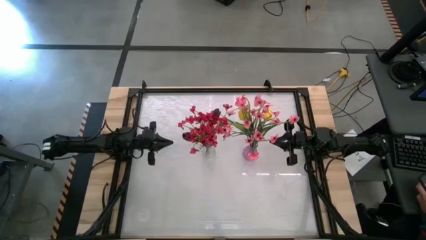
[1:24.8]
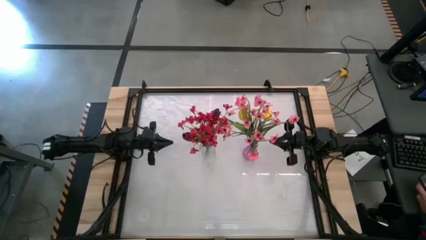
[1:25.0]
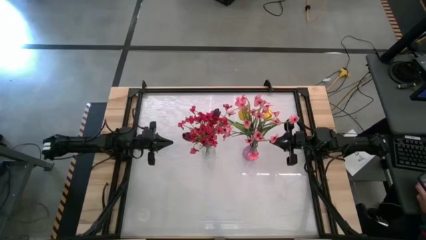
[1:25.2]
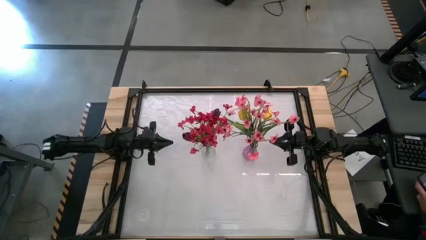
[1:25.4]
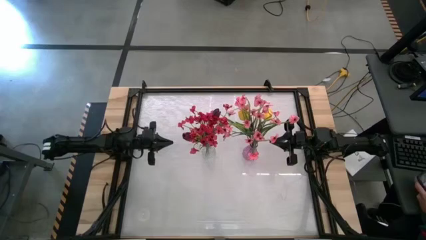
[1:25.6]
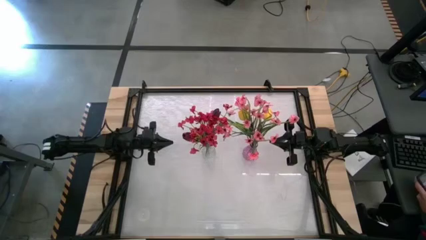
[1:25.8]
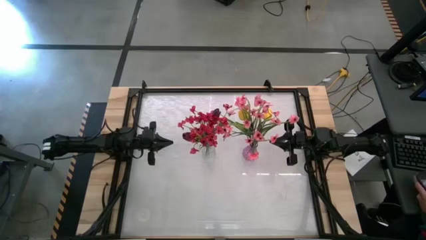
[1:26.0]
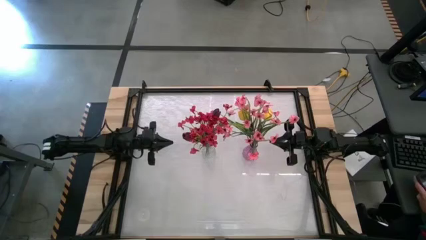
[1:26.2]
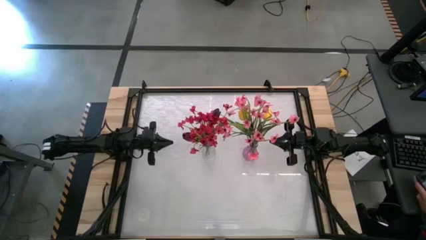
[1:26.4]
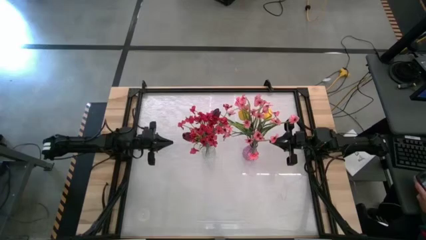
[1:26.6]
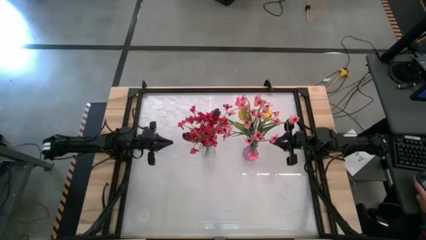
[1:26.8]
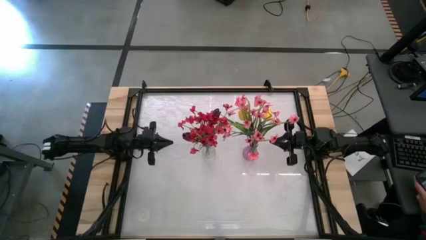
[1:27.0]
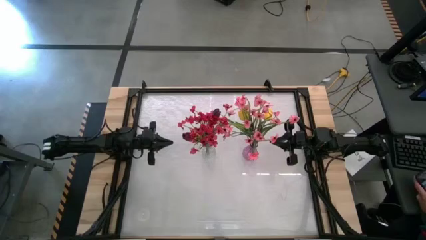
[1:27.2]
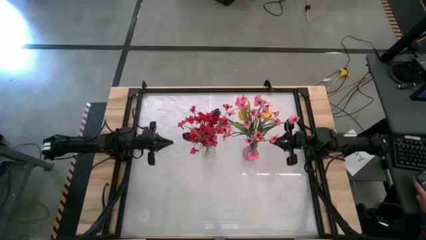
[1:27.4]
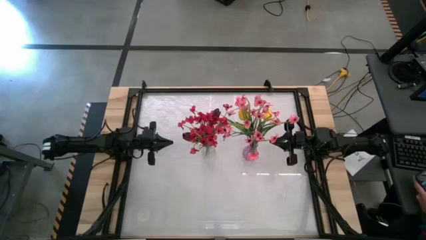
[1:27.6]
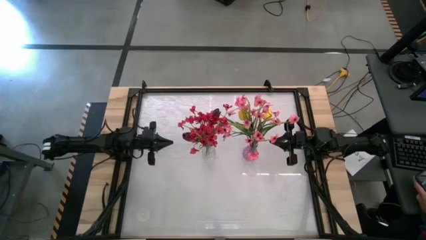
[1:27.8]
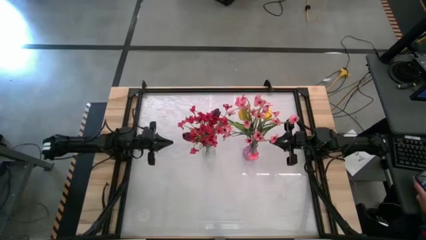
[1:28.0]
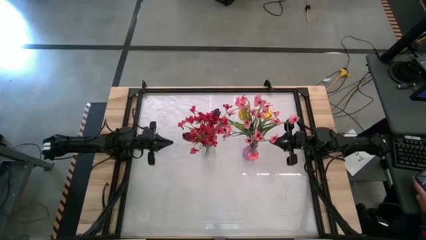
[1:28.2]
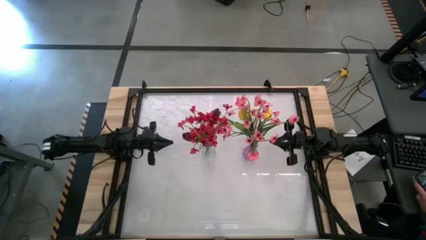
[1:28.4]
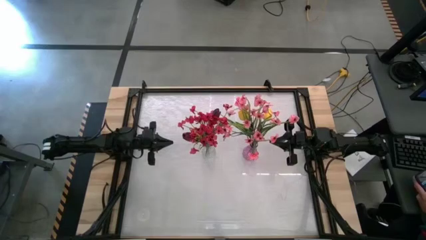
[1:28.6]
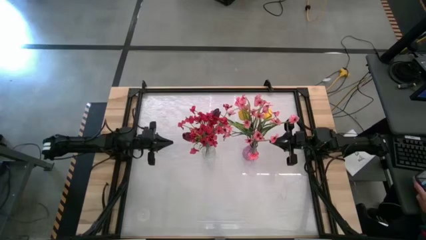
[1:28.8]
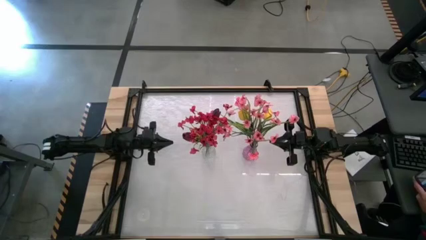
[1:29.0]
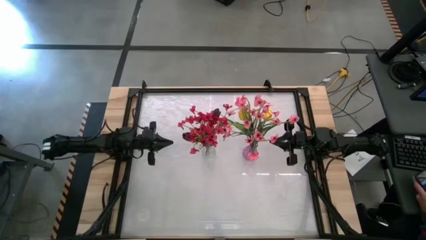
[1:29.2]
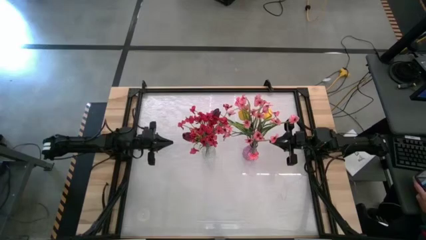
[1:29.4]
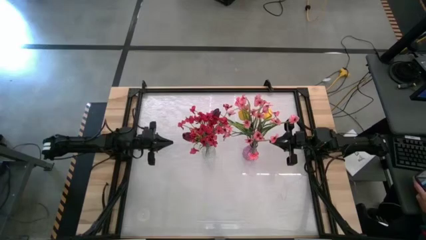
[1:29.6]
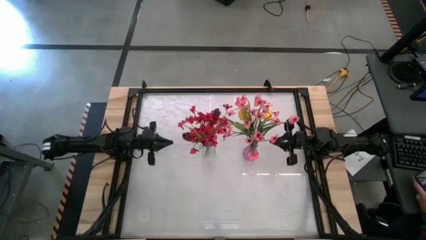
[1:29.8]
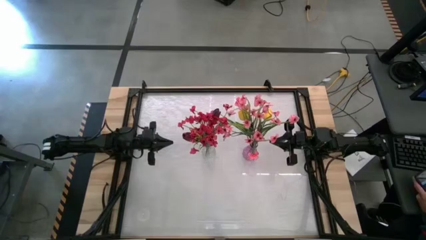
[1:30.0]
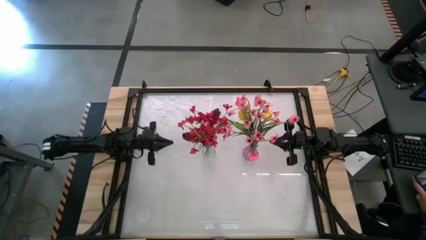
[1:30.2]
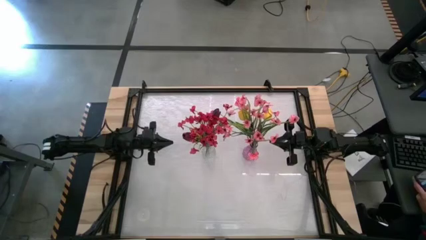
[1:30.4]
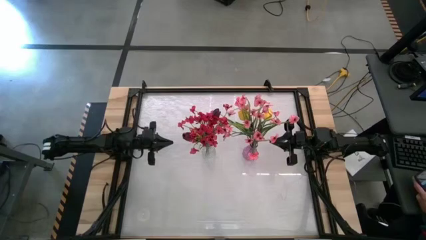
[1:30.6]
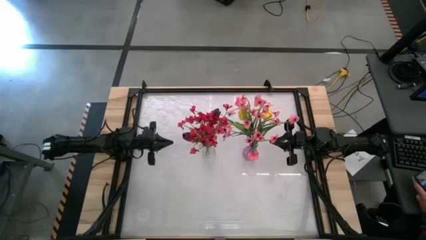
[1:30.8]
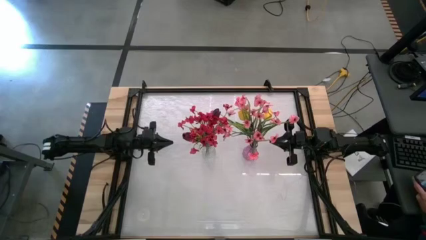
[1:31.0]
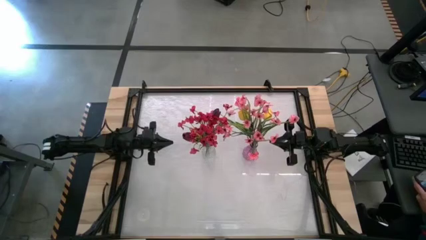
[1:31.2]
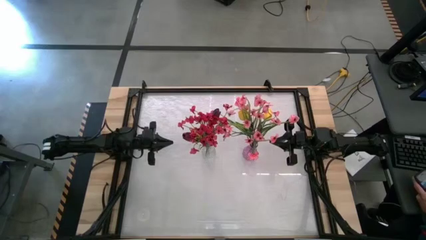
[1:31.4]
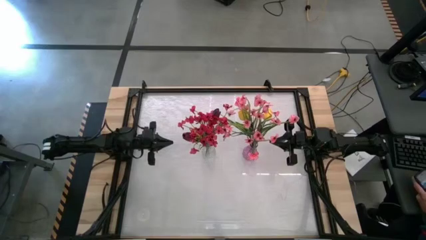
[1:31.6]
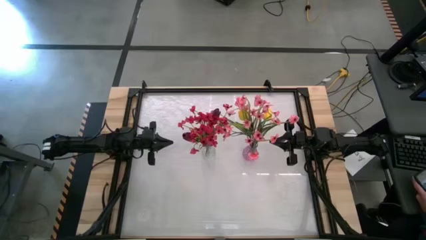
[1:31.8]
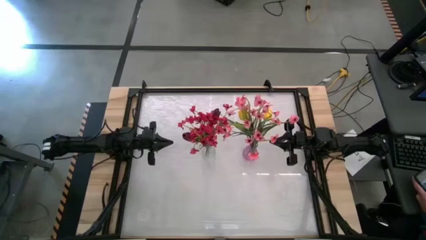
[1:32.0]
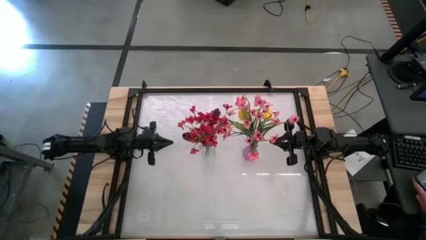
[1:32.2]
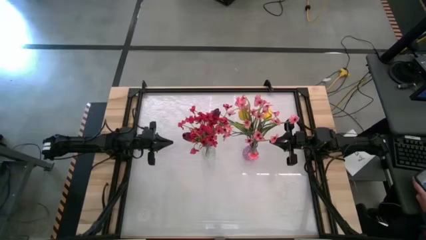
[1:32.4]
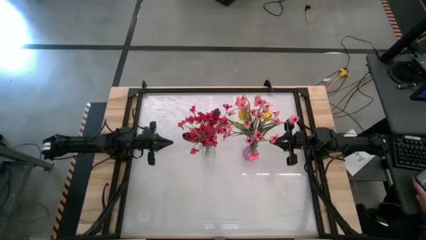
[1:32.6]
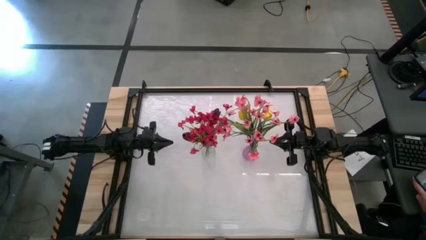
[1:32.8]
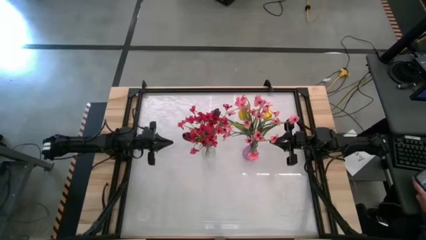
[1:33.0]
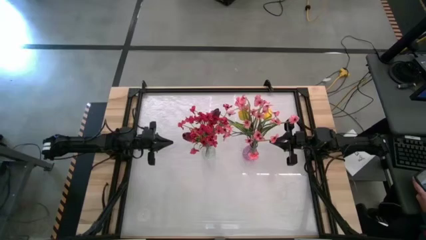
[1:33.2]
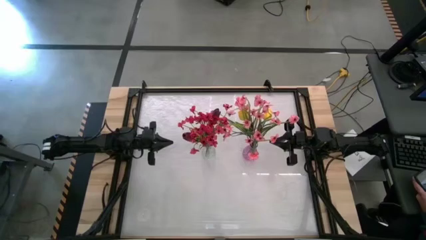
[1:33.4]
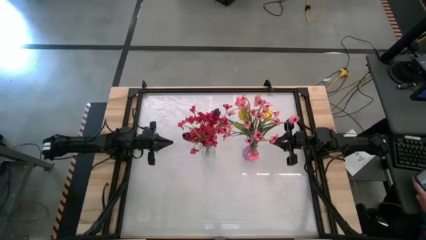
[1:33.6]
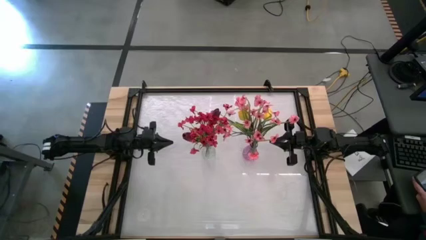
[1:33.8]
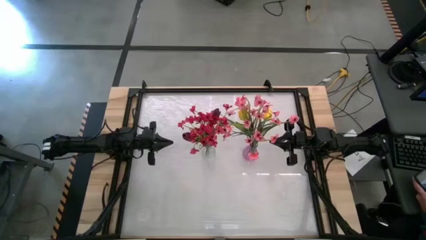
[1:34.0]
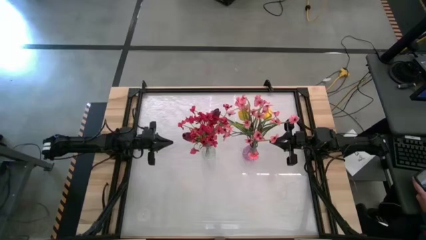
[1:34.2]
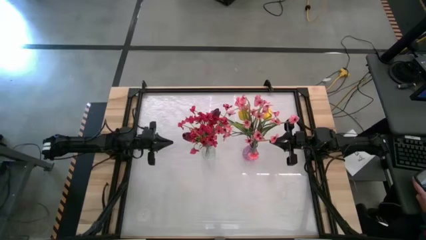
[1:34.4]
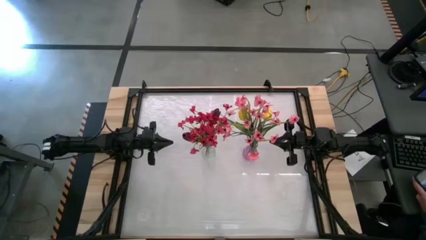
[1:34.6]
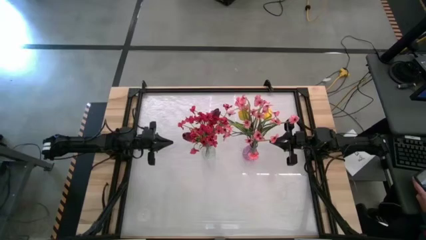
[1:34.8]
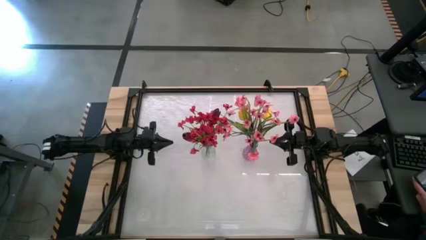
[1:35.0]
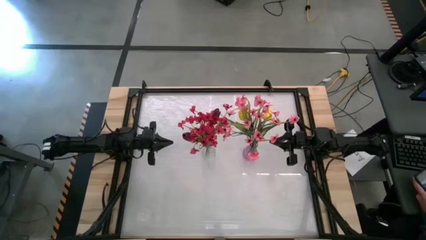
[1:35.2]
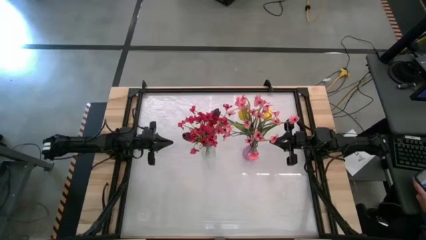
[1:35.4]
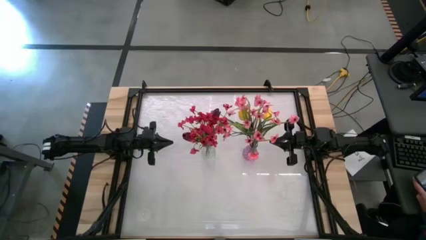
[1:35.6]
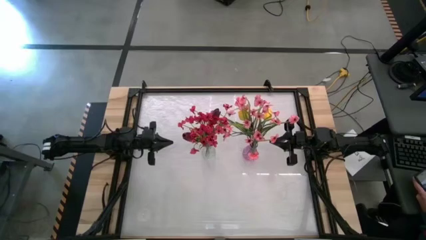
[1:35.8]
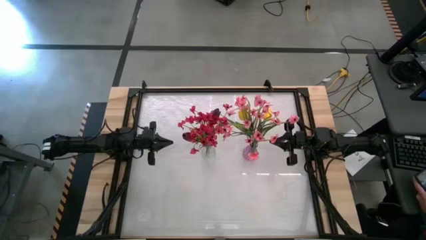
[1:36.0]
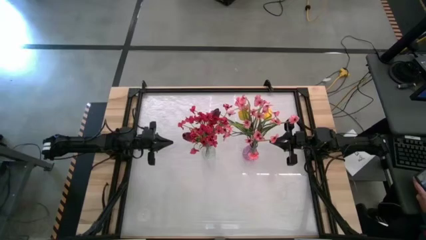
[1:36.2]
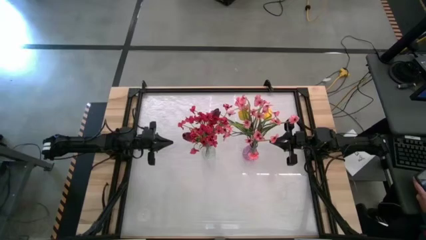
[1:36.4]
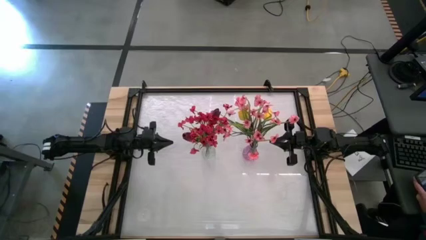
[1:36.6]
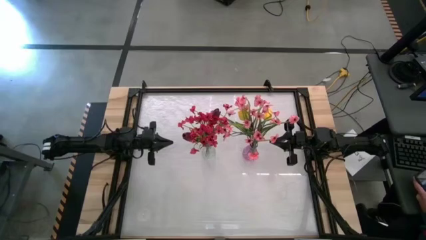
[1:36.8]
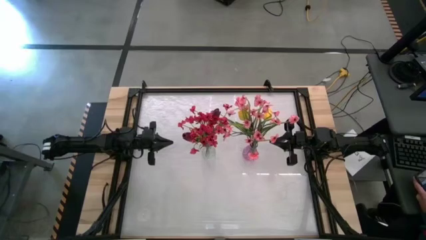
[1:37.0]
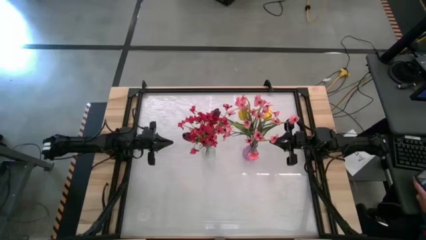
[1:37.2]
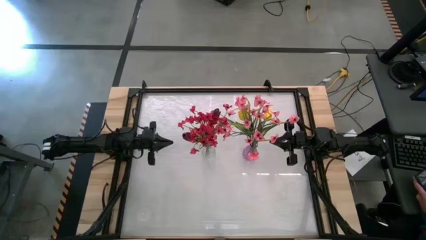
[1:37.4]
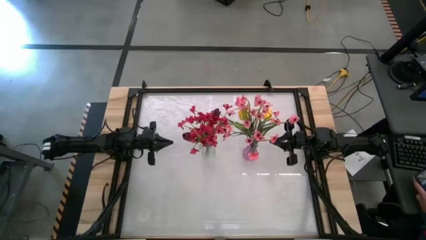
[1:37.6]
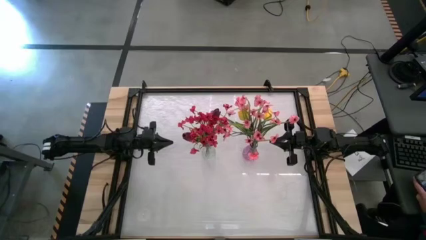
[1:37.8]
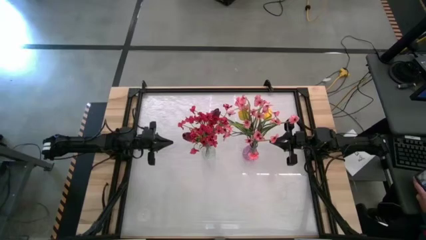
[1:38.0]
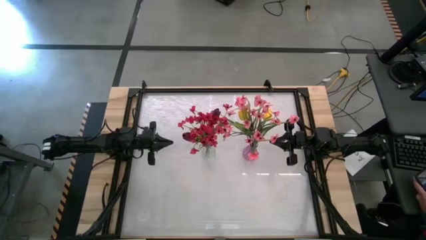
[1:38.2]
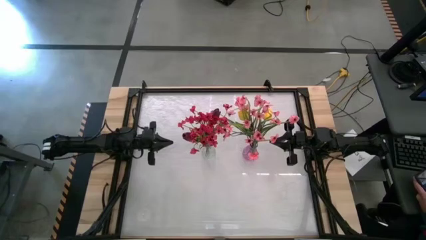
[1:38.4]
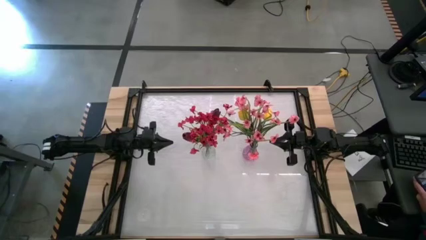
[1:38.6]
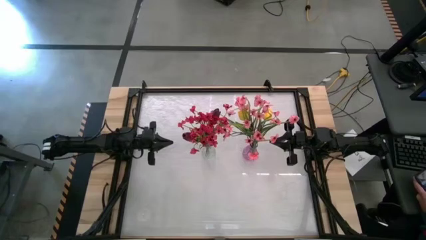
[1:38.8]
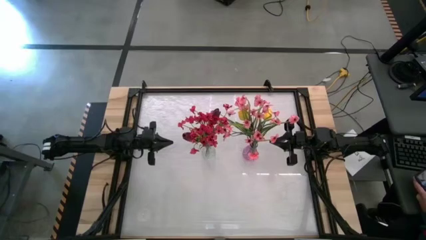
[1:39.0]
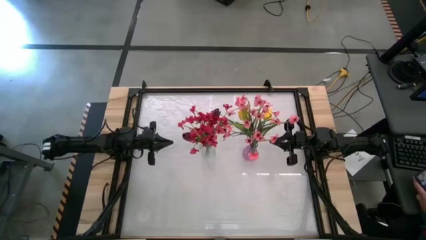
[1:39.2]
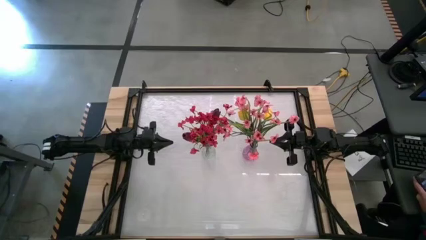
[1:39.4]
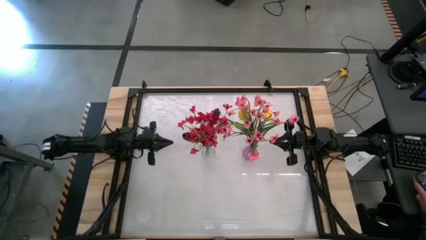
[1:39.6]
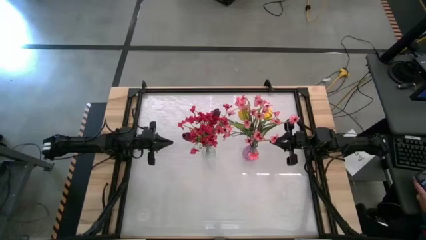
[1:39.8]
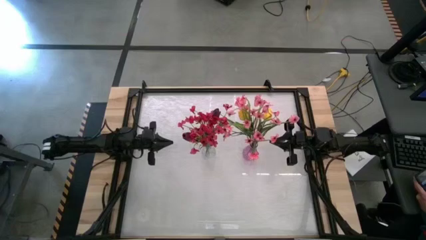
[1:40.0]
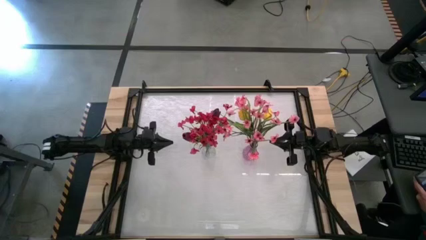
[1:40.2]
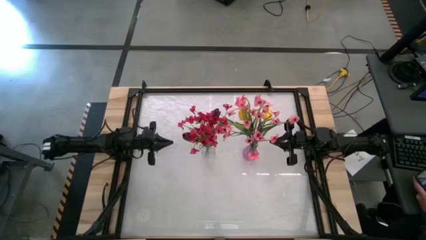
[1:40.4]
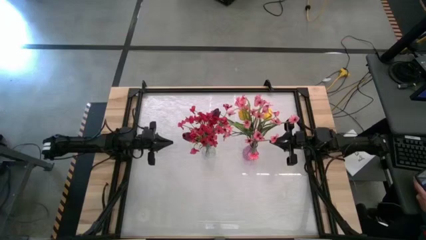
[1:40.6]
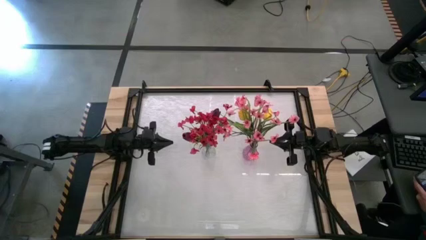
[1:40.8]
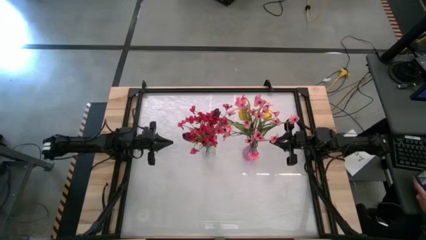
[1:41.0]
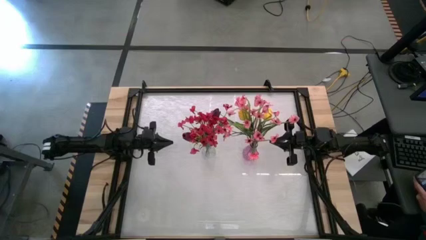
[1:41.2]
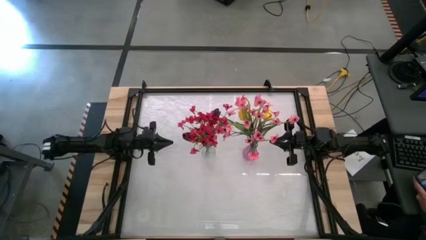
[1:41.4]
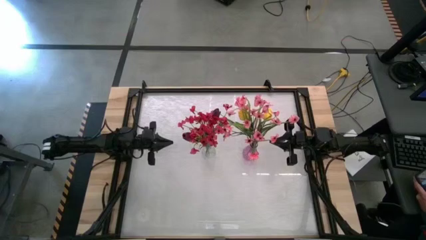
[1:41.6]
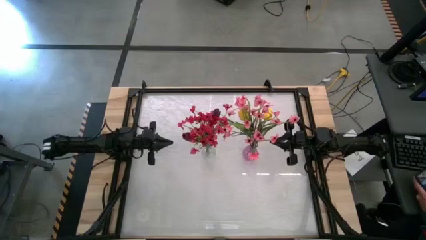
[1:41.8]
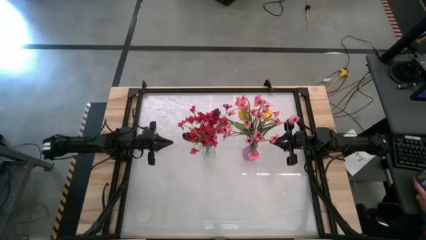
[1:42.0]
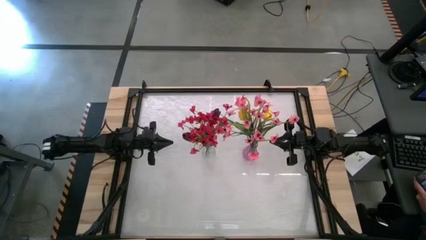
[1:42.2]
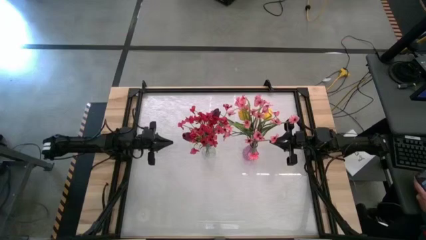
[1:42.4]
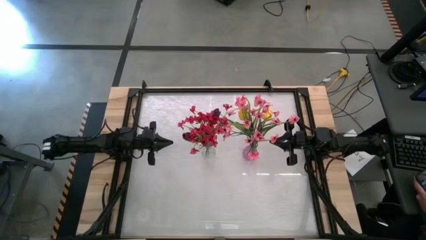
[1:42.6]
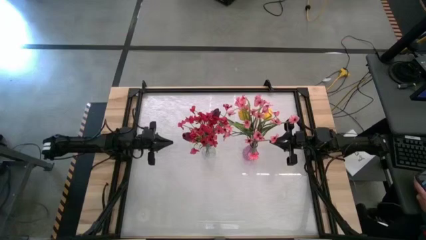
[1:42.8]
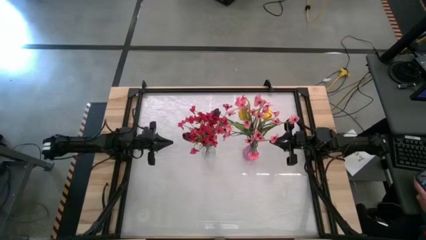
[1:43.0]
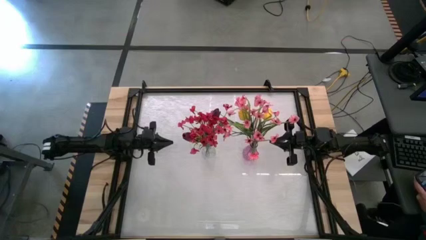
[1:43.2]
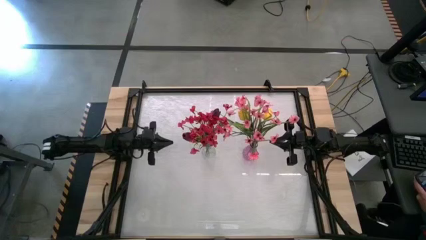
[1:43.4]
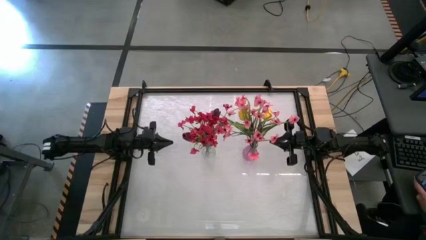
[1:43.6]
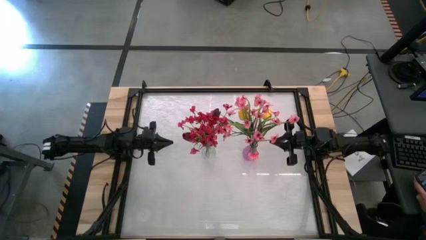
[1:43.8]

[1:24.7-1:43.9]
Task: Sort flowers into vase by color
Return to Home Position
